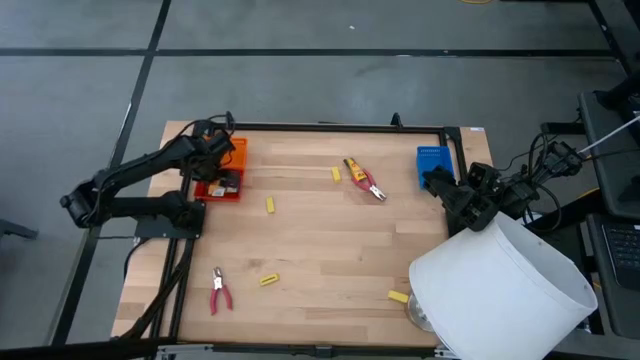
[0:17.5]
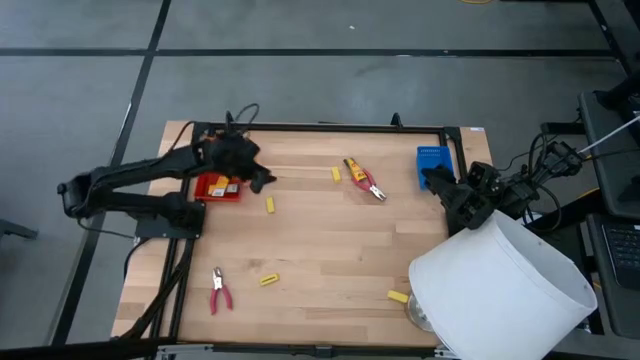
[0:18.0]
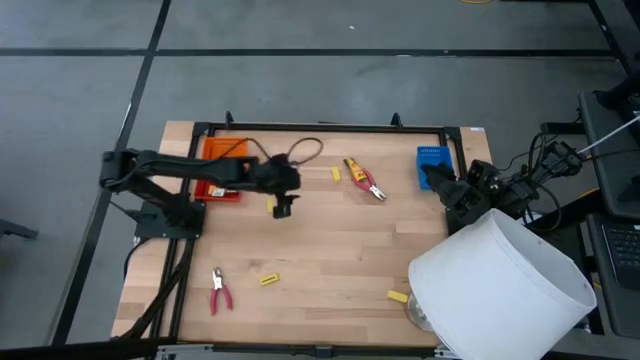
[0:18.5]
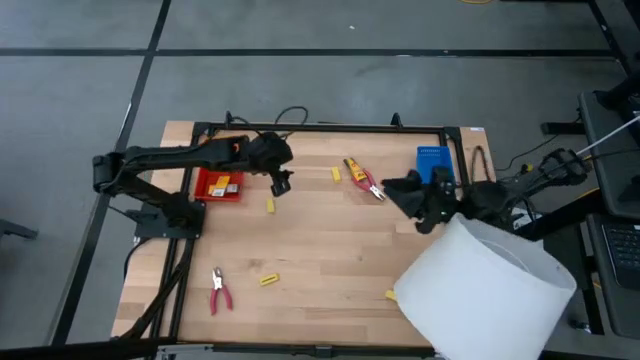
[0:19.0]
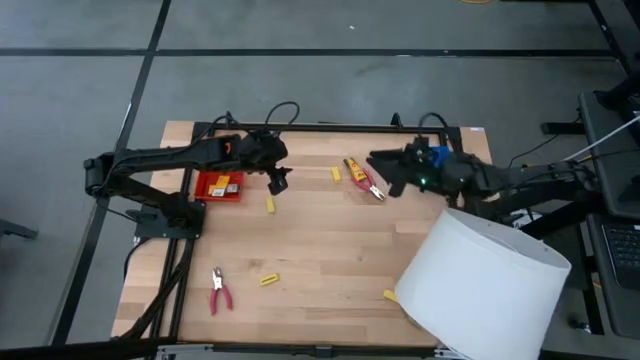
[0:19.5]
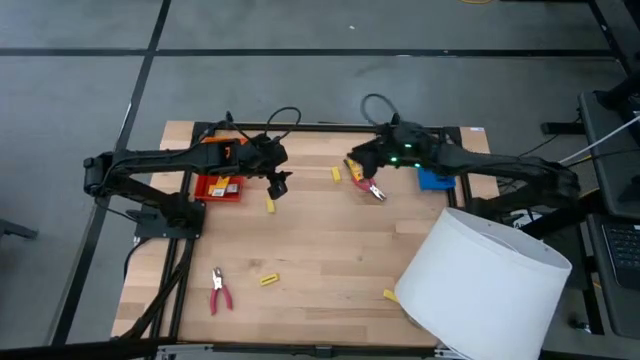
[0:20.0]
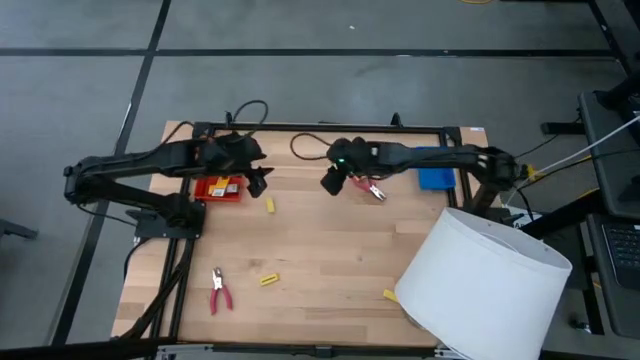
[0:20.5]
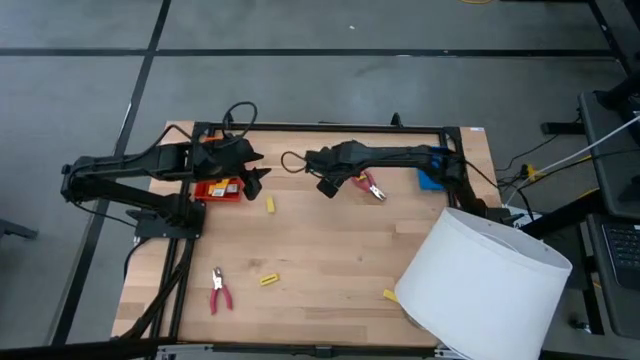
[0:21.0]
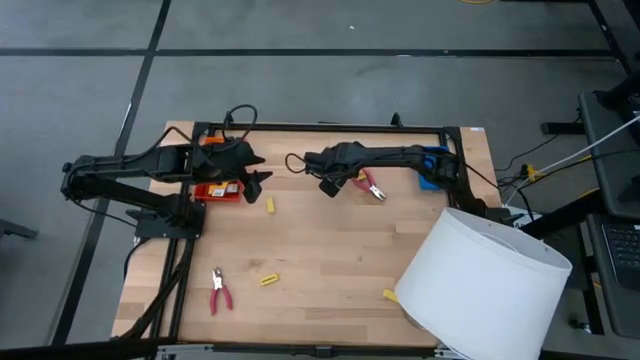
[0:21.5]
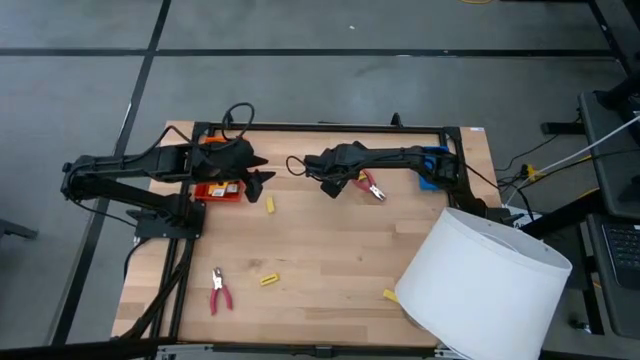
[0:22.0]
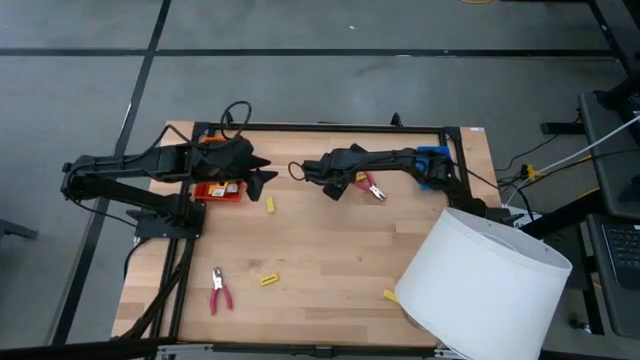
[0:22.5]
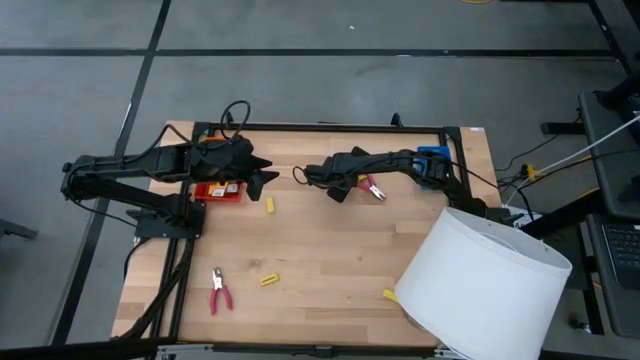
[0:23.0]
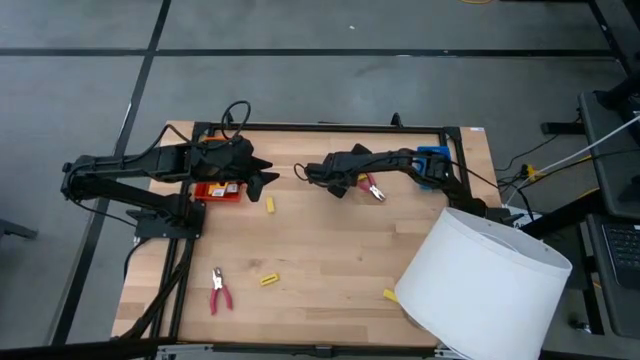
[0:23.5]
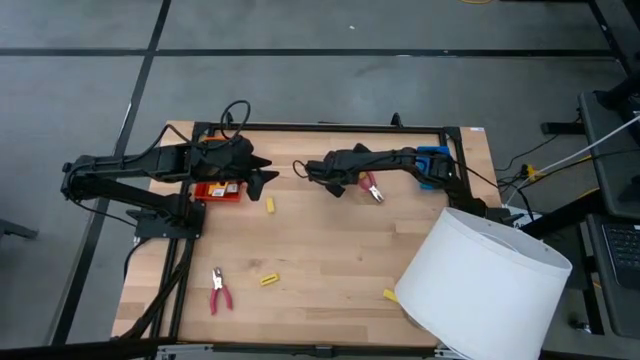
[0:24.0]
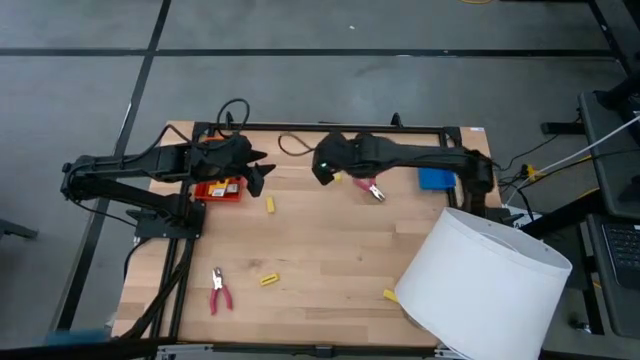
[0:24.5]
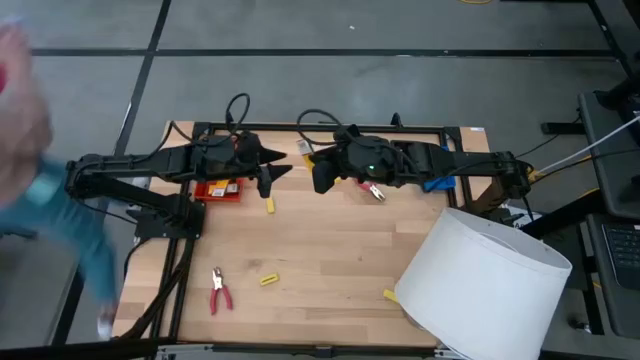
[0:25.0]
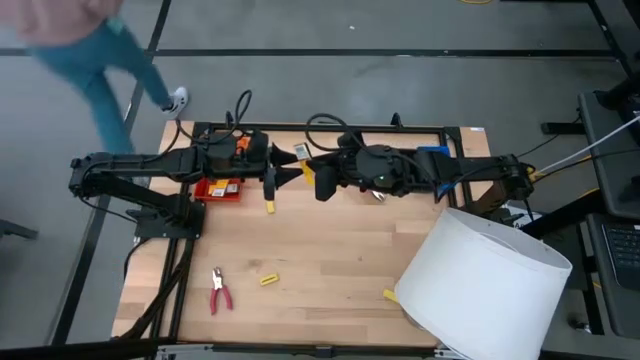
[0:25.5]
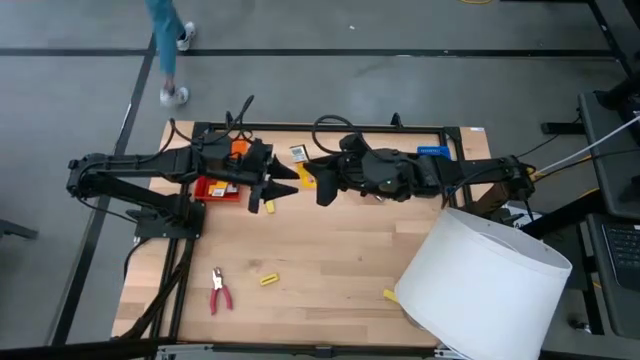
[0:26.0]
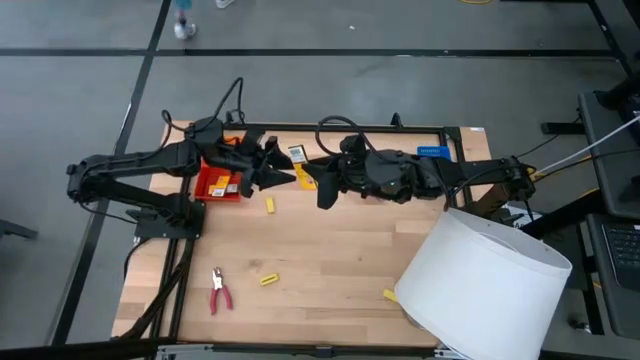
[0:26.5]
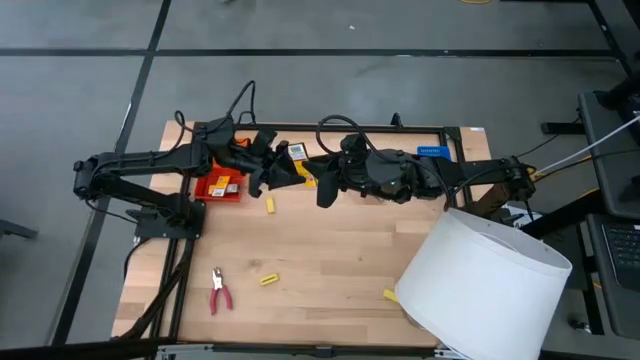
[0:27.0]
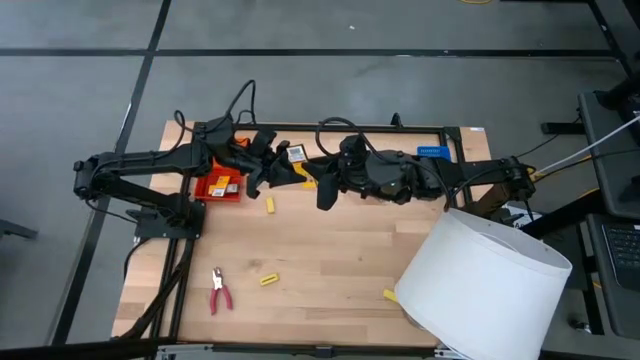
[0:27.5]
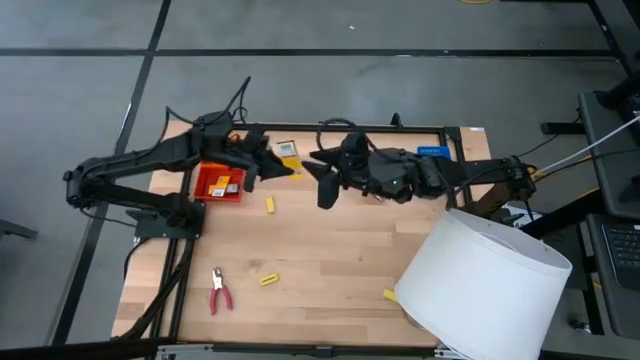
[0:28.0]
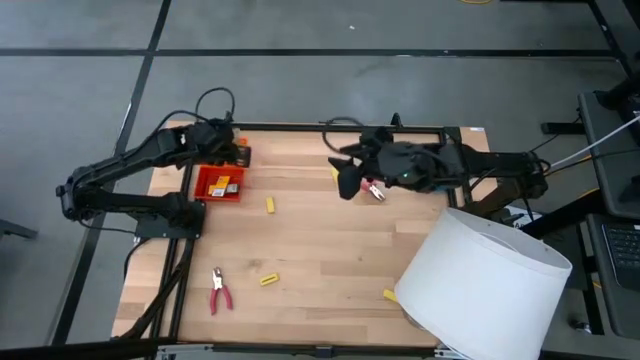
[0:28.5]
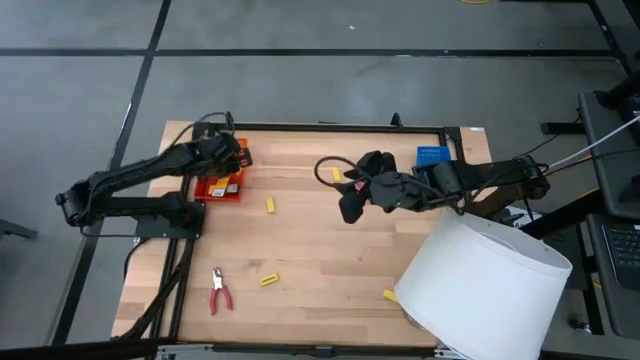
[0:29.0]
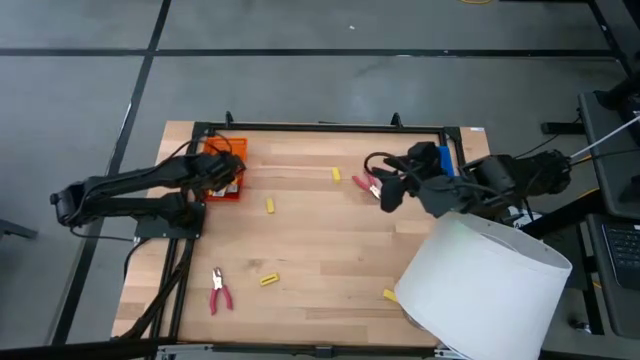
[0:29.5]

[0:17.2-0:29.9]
Task: Pick & Place School Supplies
Put the yellow crayon box into the red bin

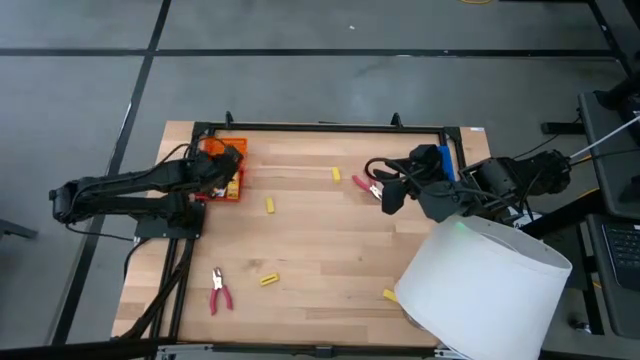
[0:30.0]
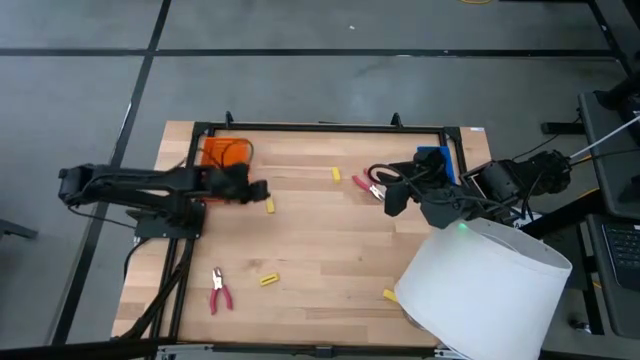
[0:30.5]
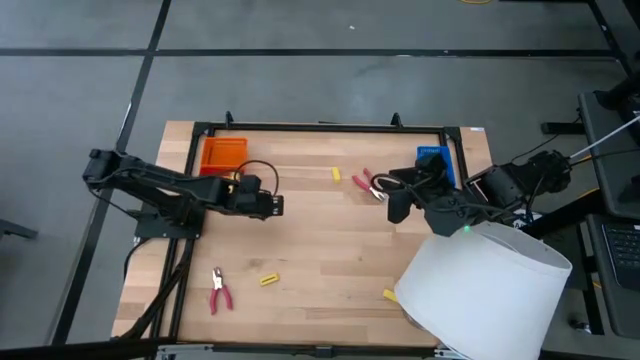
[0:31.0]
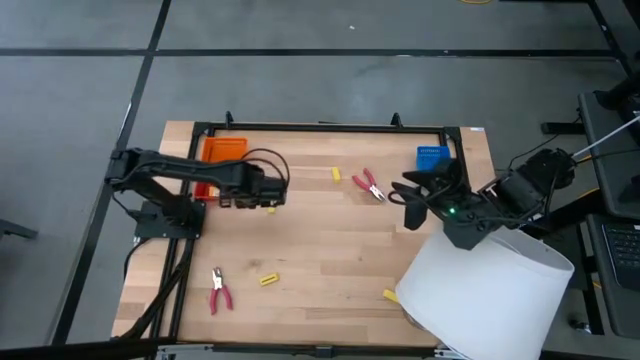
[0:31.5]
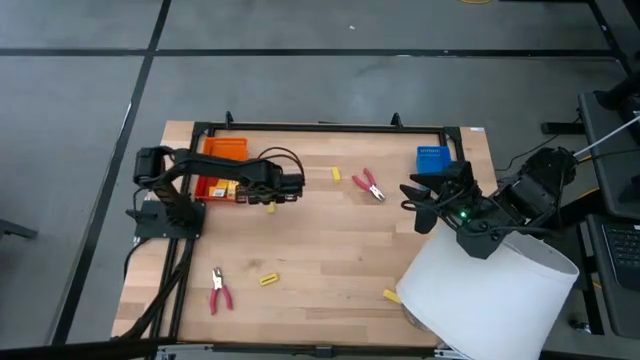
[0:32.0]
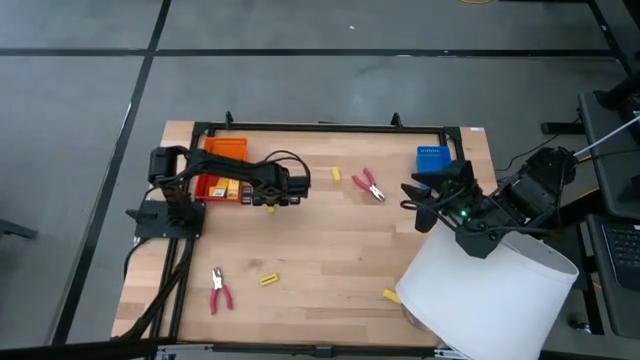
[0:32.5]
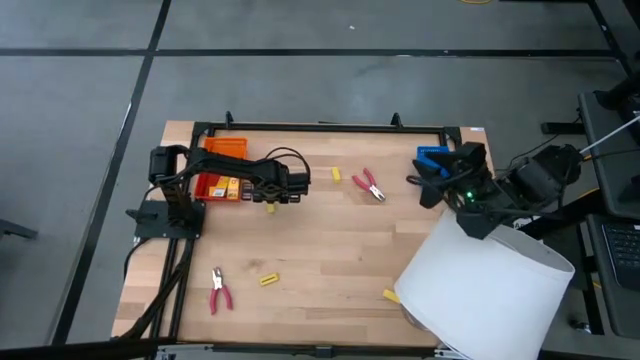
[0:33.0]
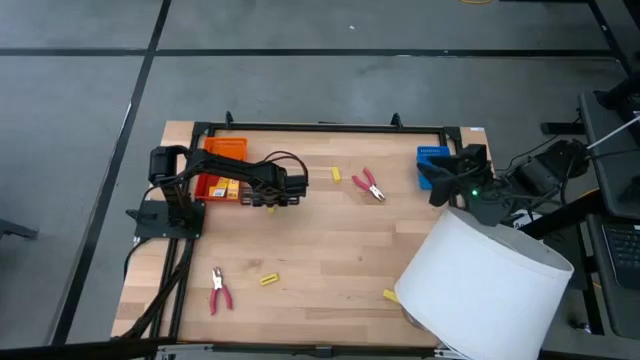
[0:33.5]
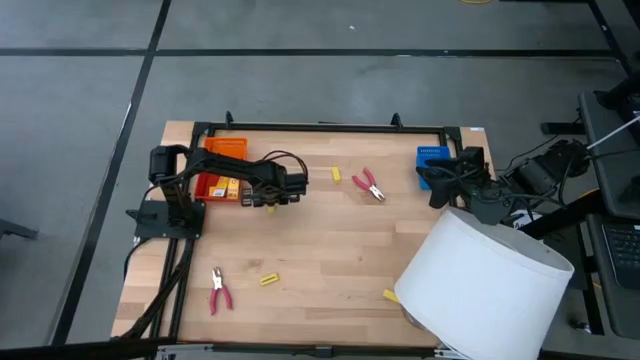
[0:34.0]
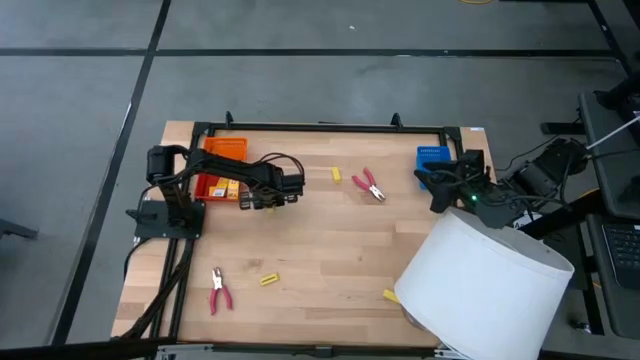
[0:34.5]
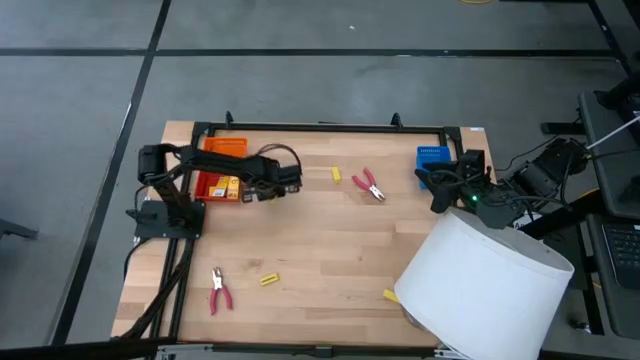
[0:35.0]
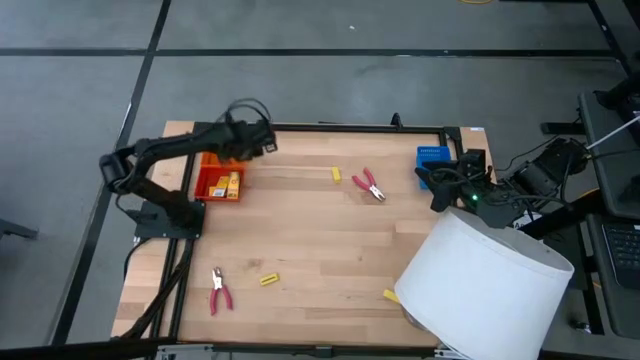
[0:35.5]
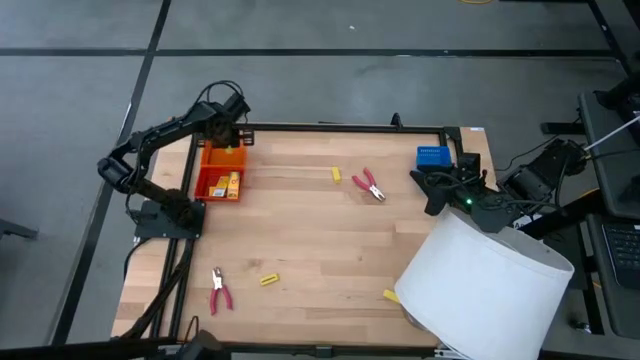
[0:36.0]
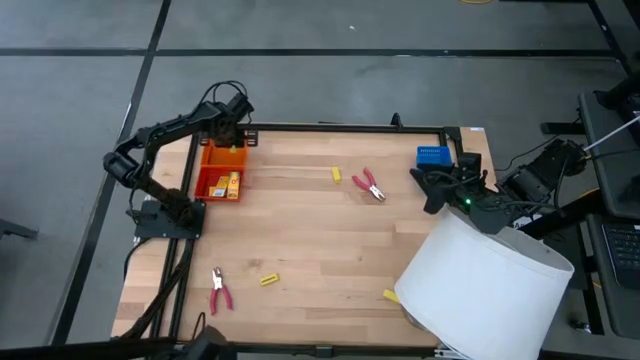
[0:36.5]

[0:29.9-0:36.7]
Put the top left yellow eraser into the orange bin
